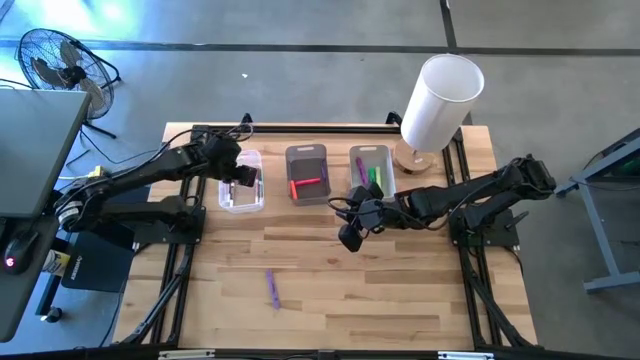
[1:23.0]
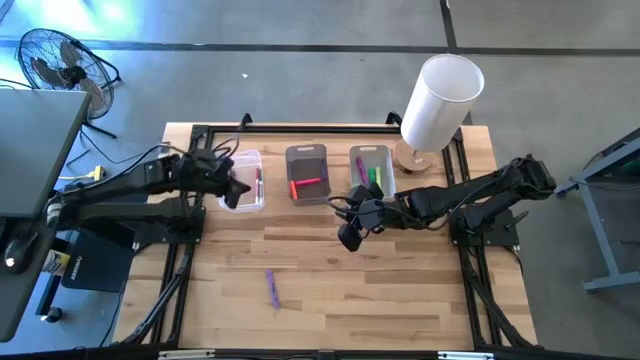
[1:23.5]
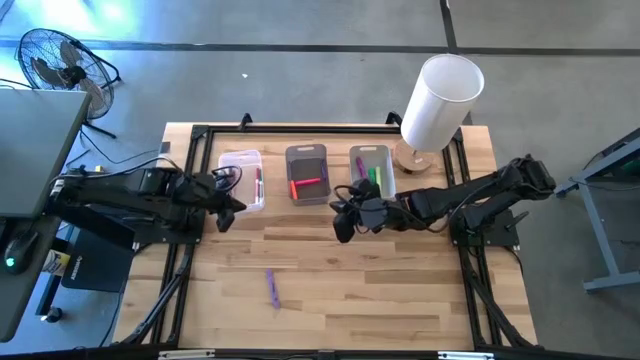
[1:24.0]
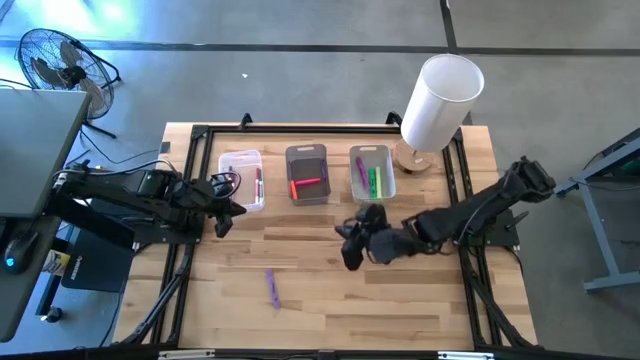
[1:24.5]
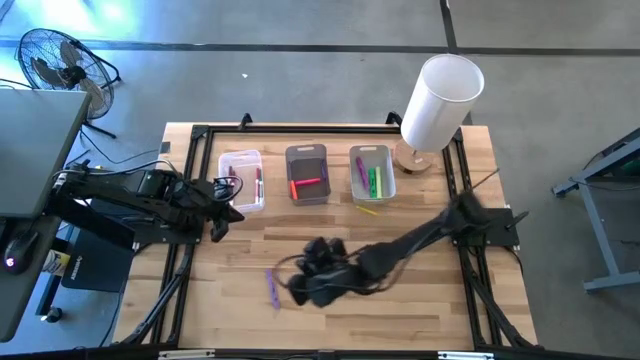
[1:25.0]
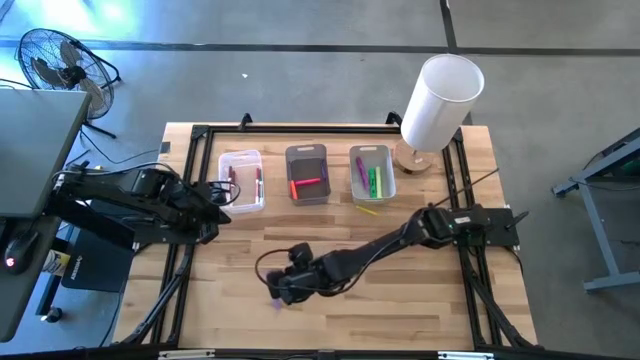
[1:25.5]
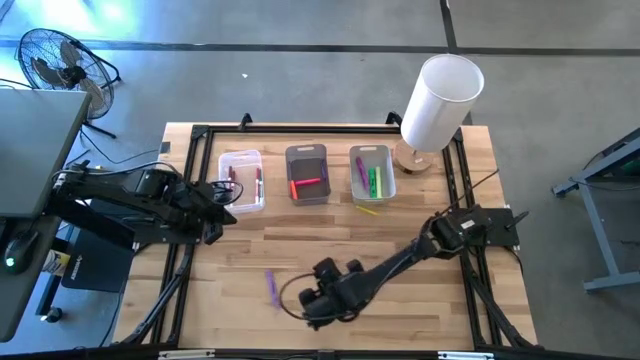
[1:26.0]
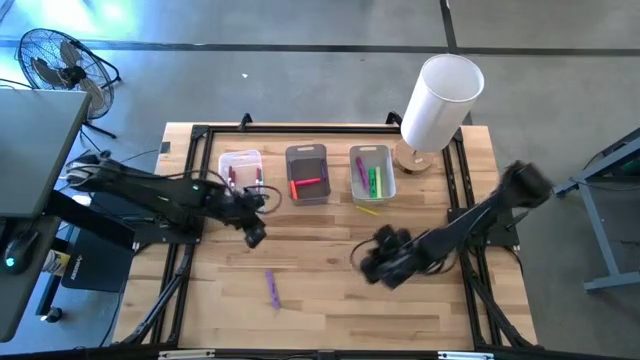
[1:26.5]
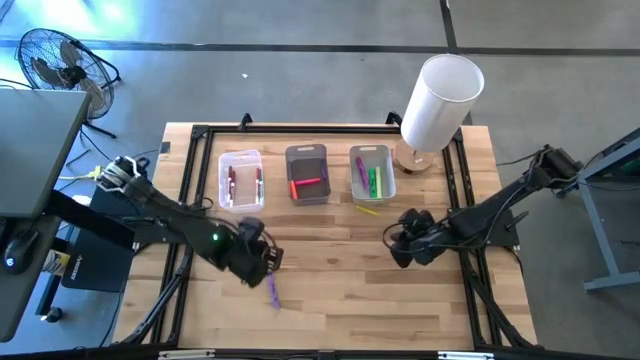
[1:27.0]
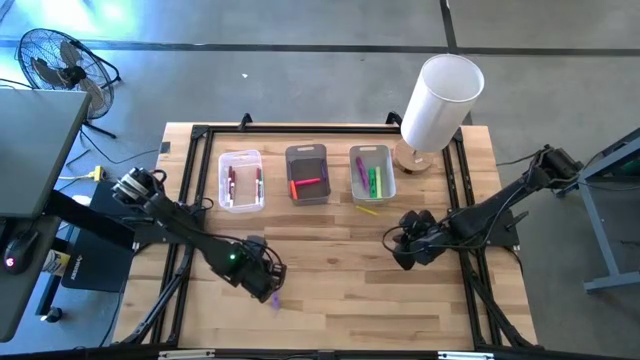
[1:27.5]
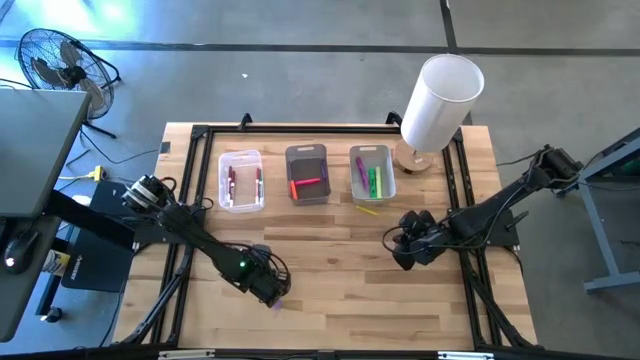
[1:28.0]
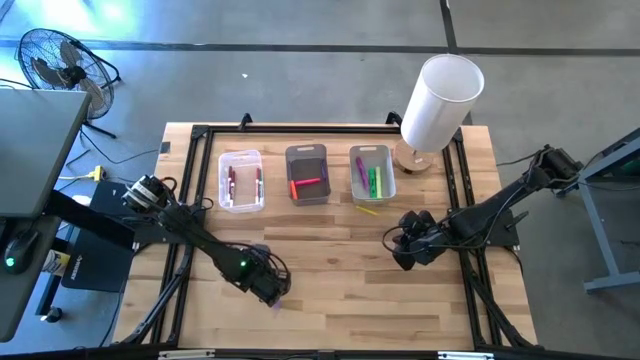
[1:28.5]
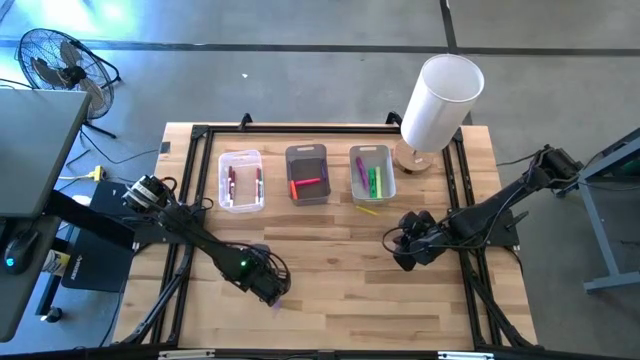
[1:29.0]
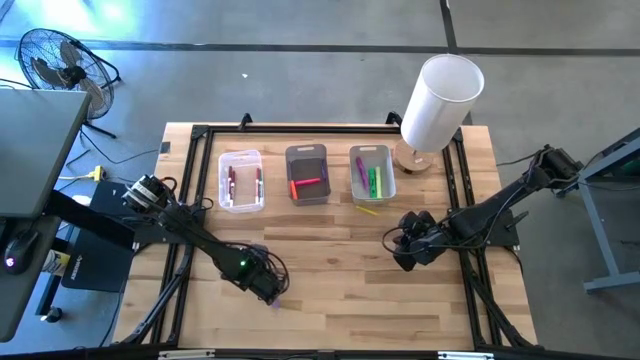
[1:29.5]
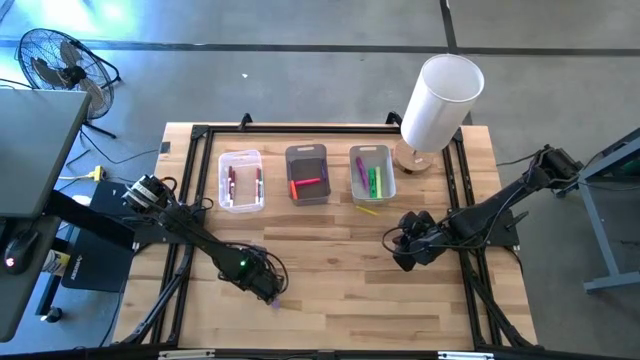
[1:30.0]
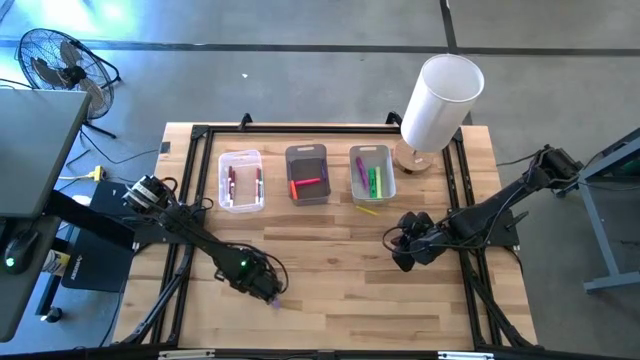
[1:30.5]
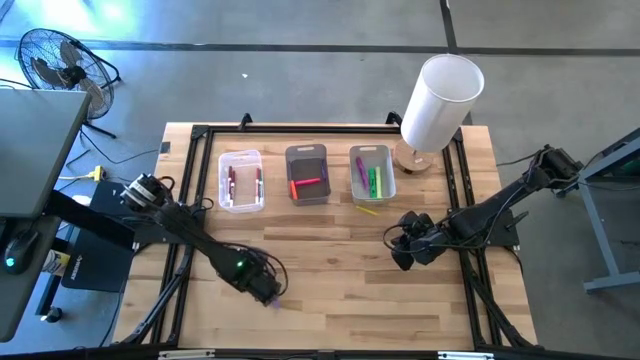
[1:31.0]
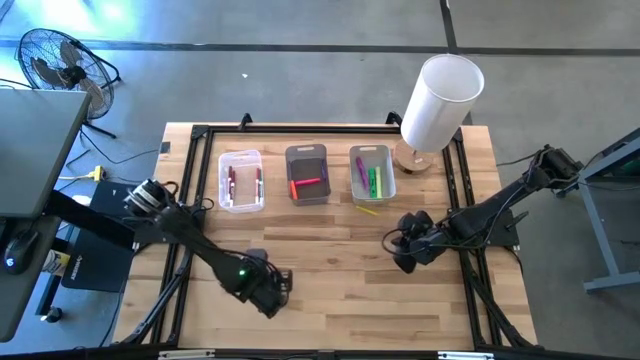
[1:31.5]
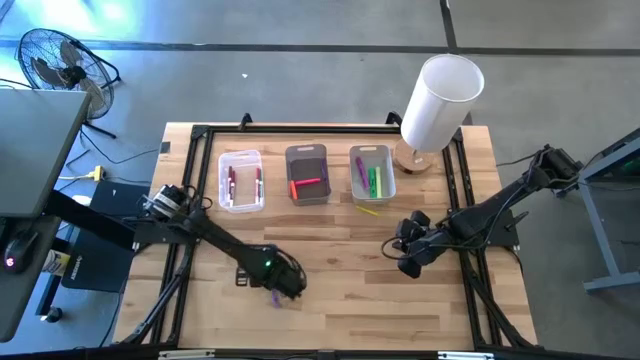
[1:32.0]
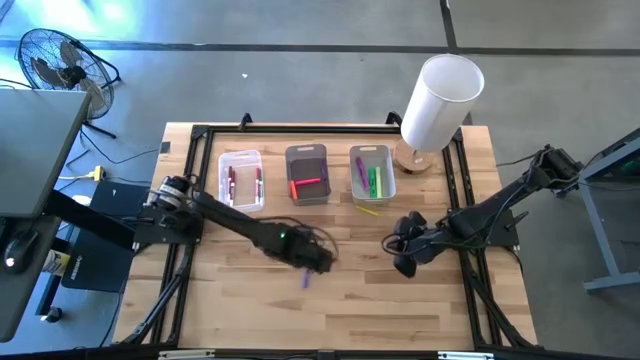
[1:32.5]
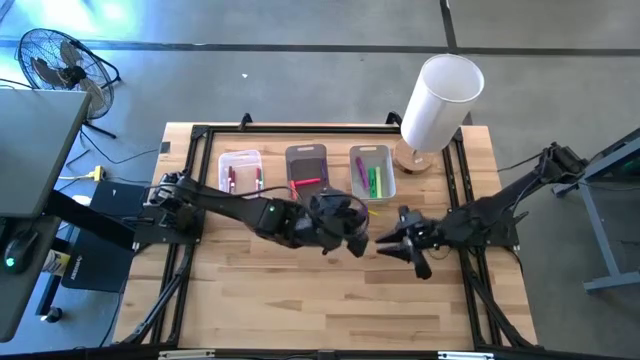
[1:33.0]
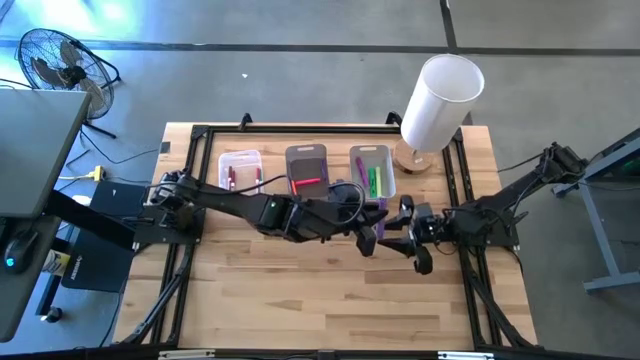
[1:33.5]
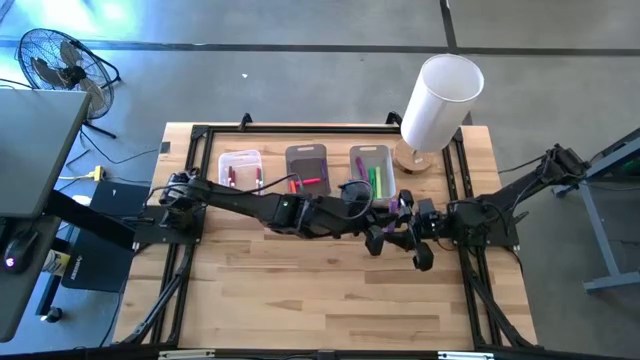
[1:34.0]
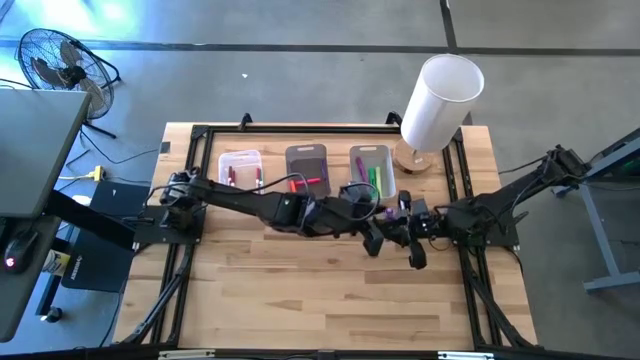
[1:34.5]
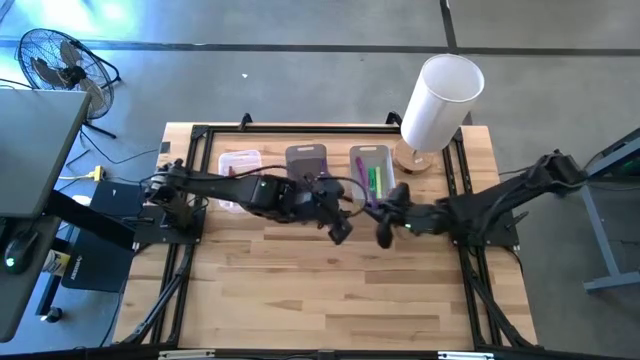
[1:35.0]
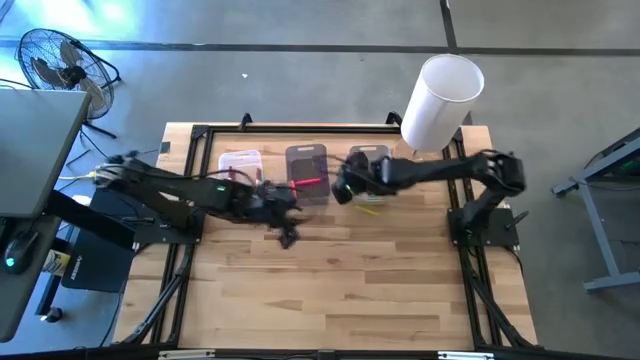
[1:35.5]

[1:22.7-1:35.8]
Task: Pick & Place Markers
Put the purple highlighter pen into the gray bin

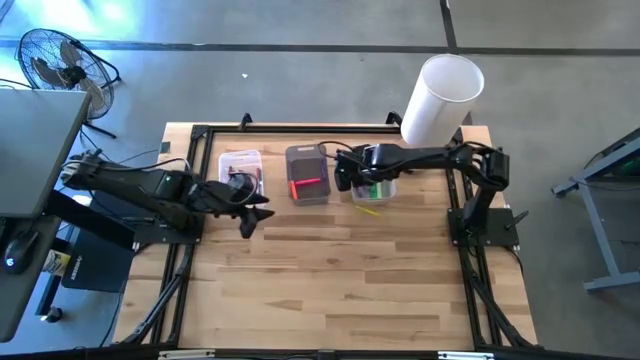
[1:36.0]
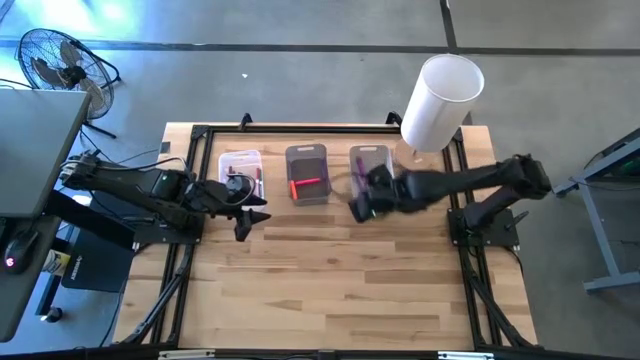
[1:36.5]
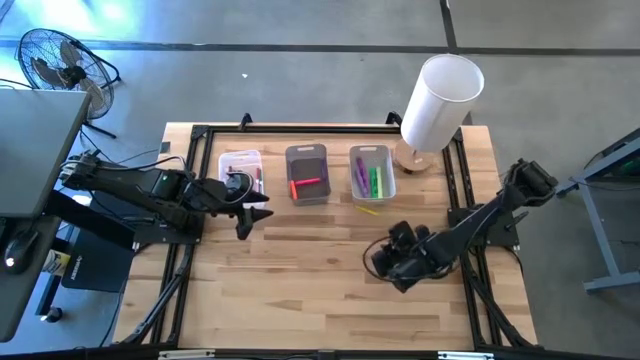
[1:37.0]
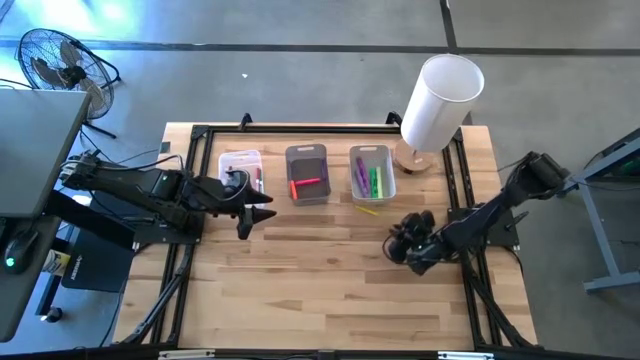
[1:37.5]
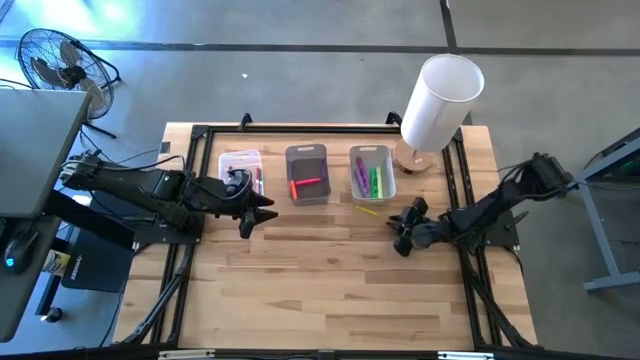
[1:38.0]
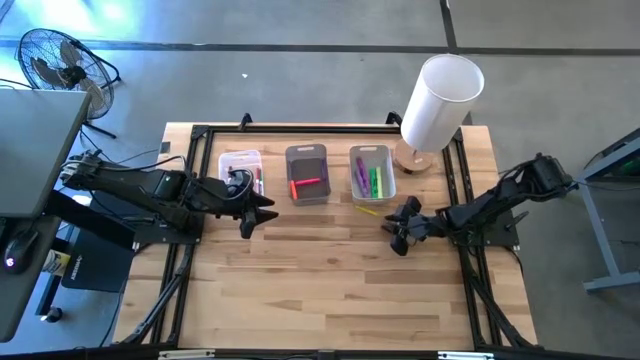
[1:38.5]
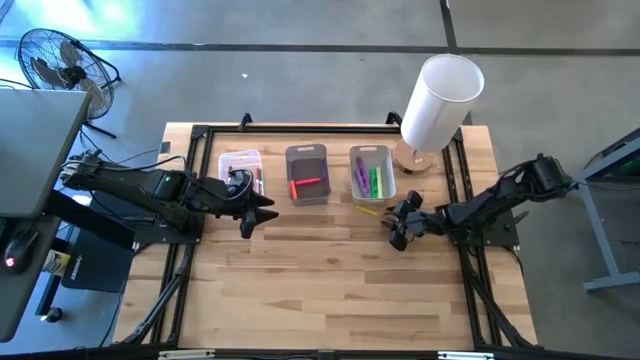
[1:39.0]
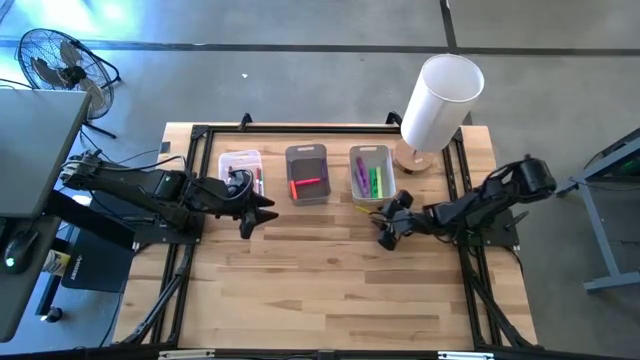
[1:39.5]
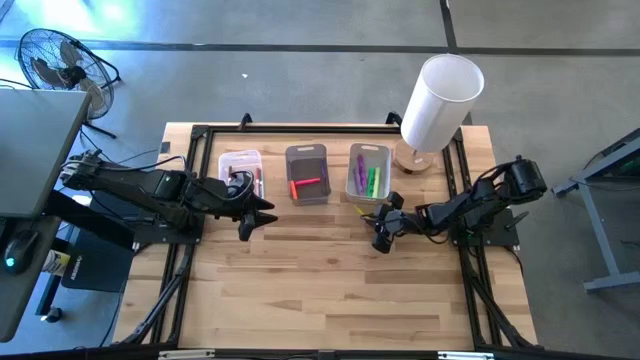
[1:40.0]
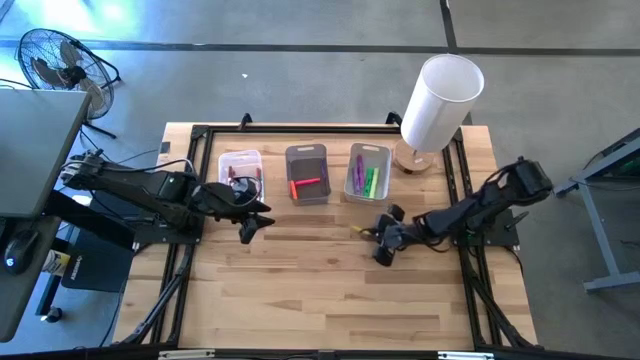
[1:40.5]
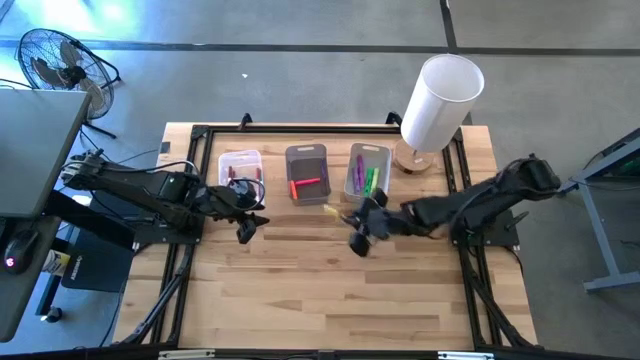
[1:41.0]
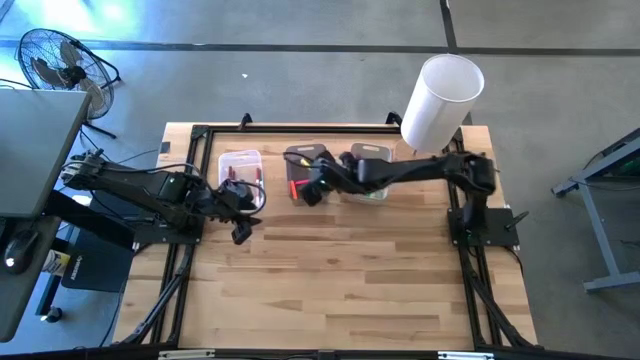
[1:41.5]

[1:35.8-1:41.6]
Put the yellow pen into the black bin
